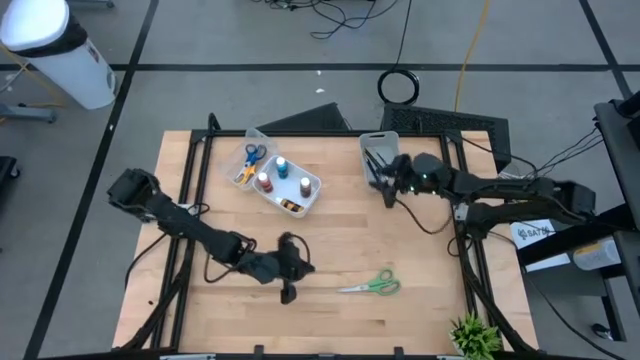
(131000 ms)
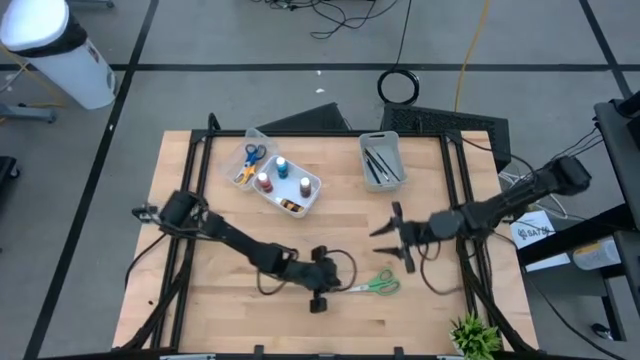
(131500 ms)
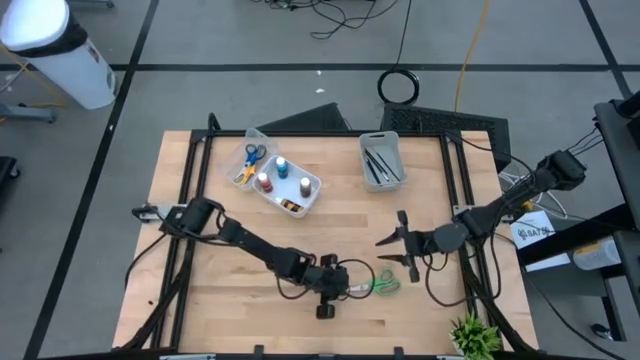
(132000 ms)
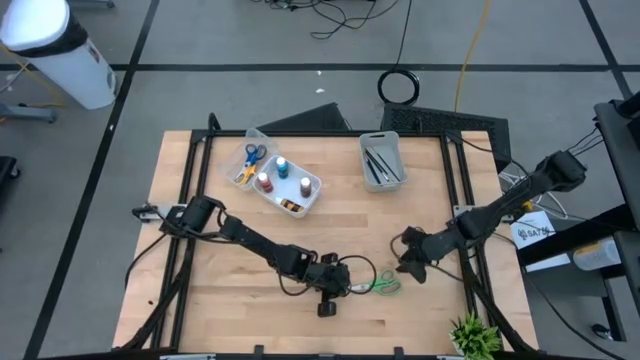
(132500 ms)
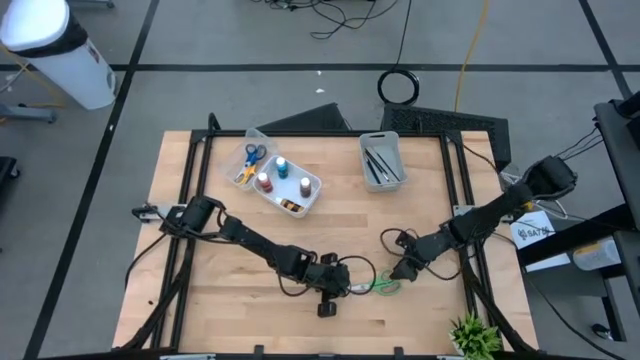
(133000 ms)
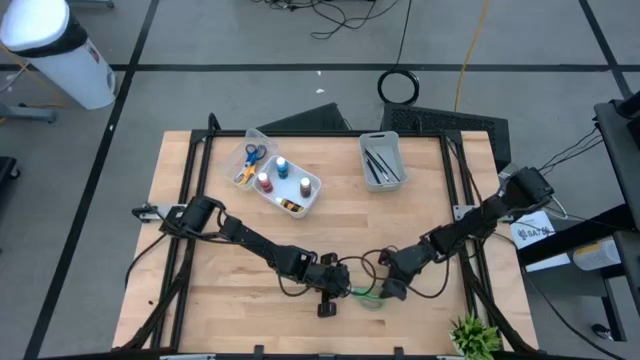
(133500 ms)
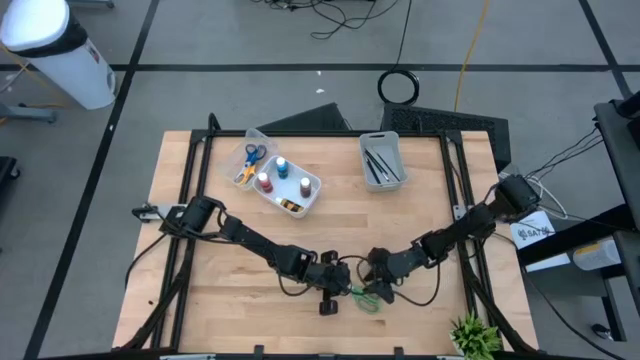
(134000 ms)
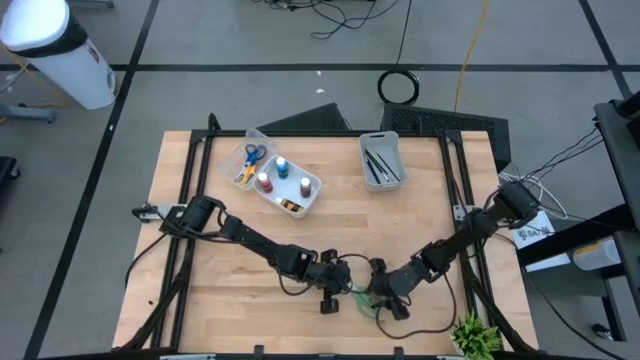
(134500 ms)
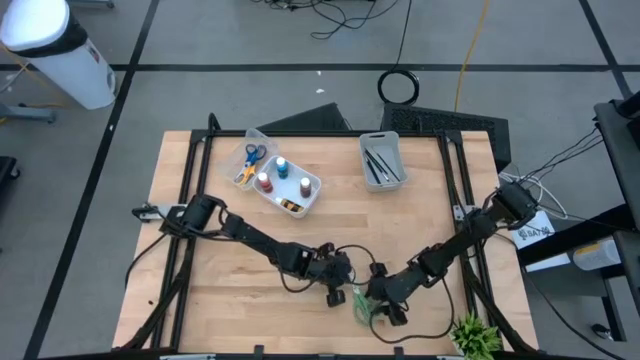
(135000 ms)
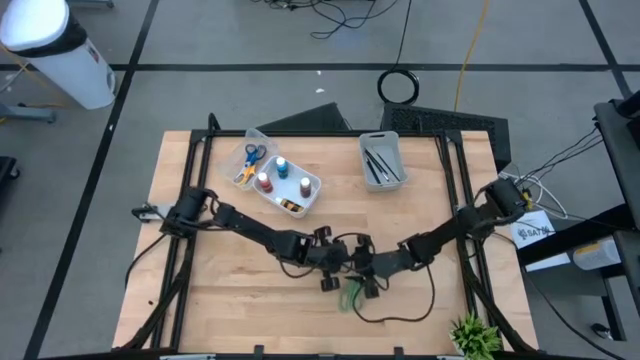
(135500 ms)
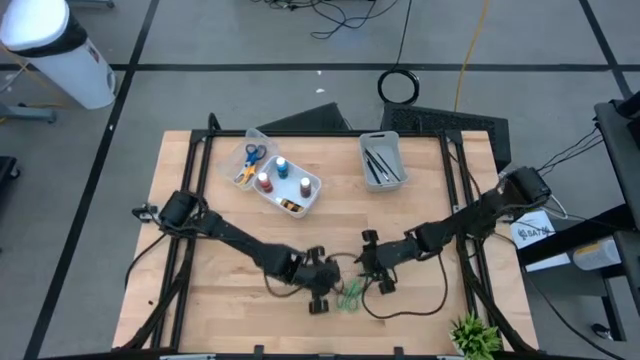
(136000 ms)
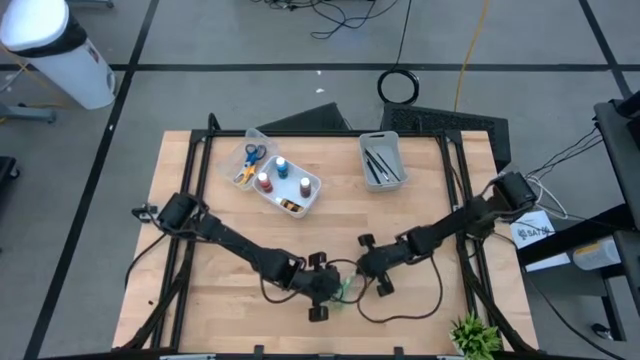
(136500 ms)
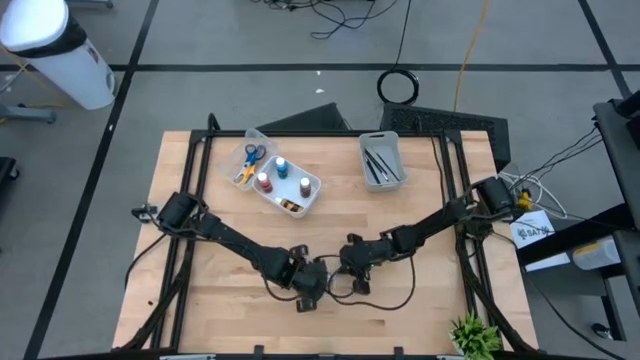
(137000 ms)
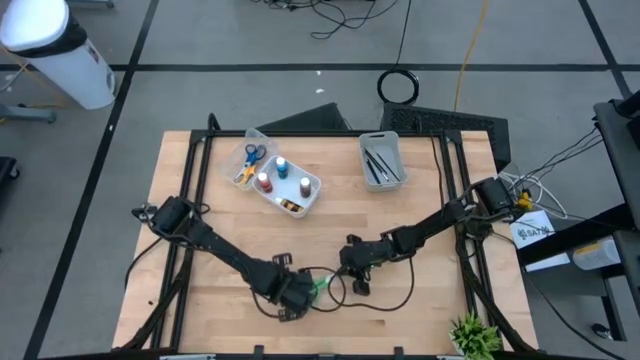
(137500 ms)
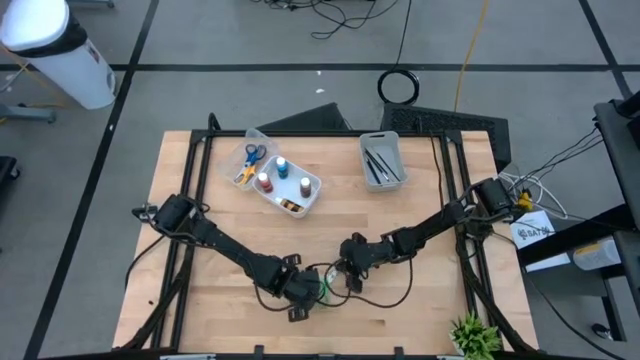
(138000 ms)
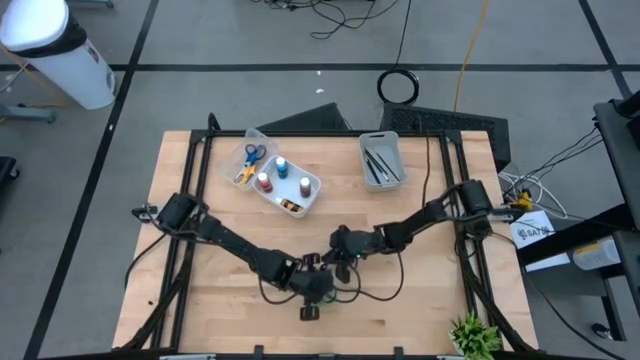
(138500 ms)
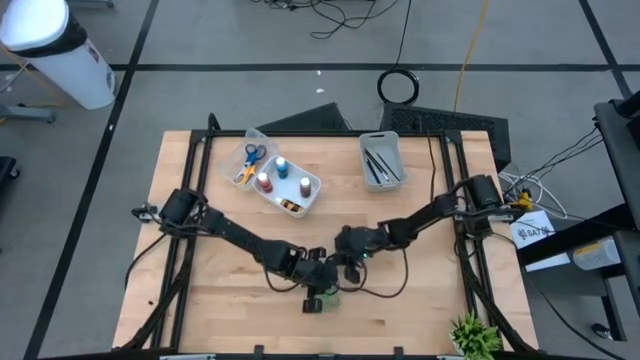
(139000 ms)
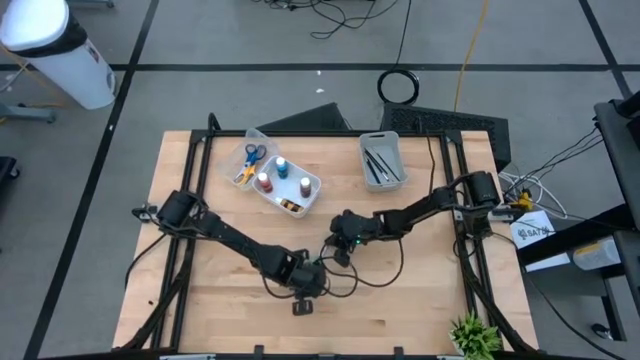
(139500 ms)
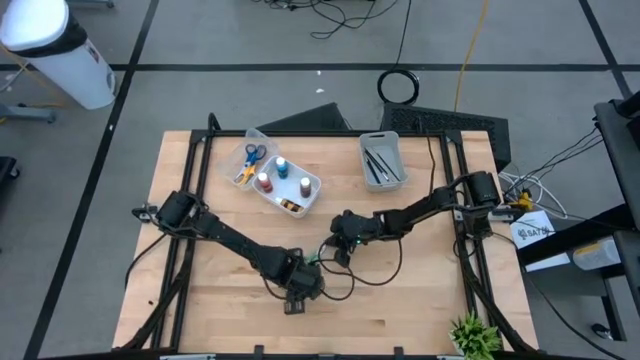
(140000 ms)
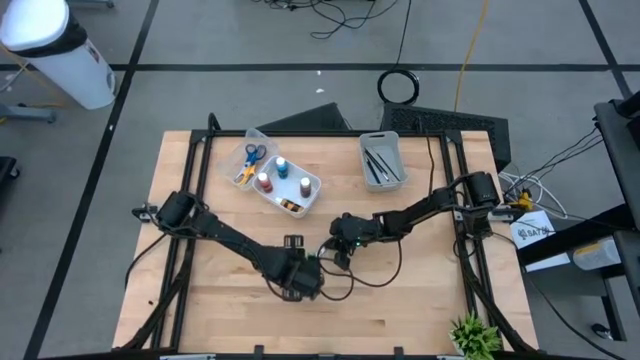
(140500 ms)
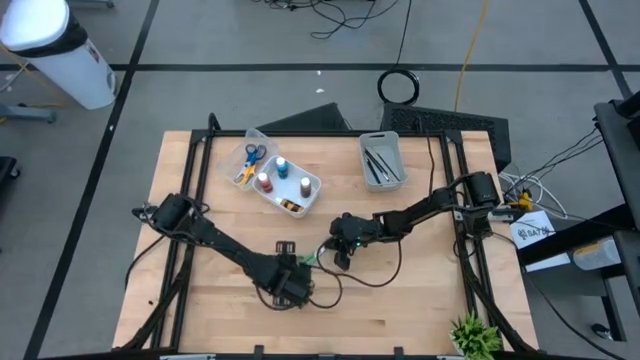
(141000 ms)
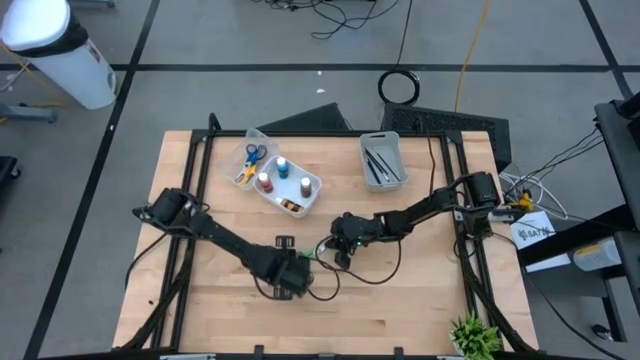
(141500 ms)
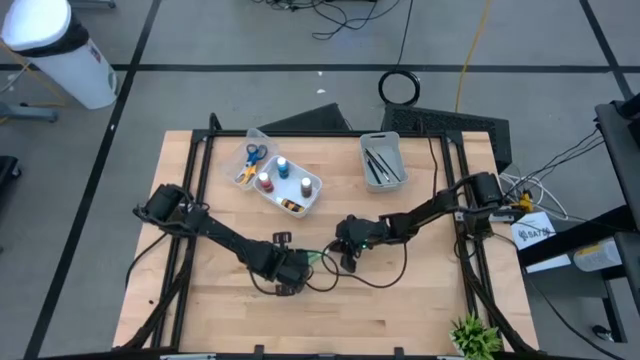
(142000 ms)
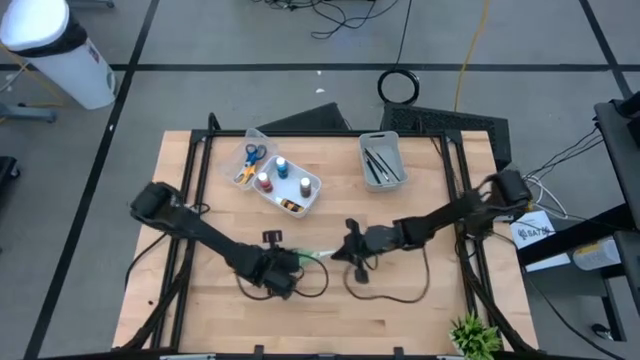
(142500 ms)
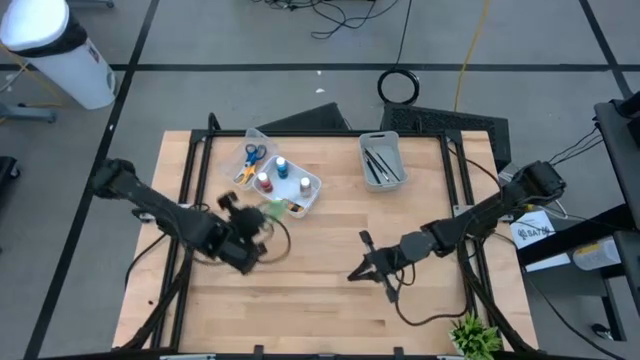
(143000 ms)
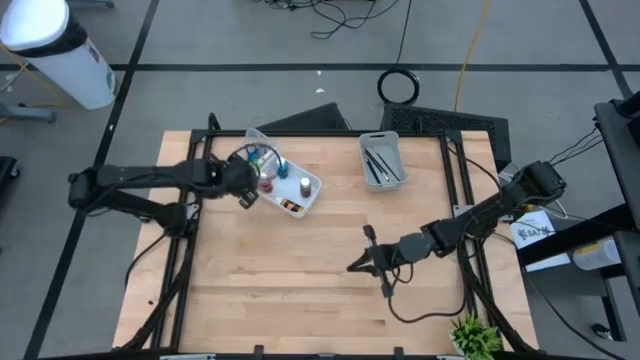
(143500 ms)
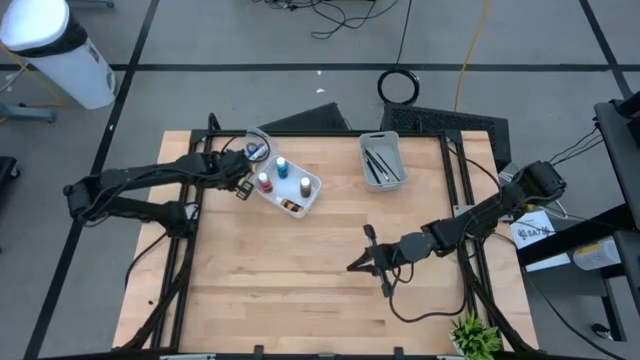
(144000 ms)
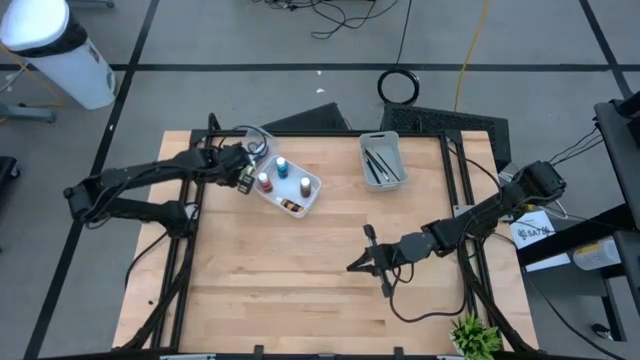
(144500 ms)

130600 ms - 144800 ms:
Task: Pick & Place Paint Supplies
Put the green scissors into the transparent bin

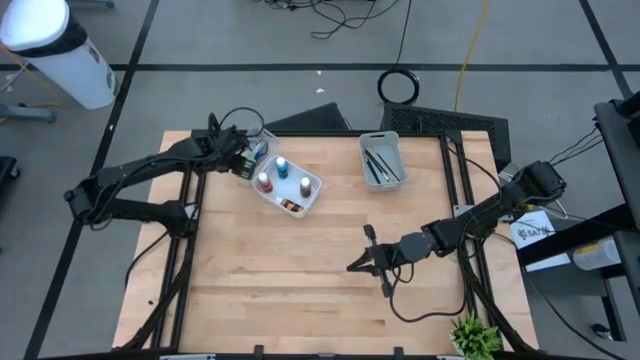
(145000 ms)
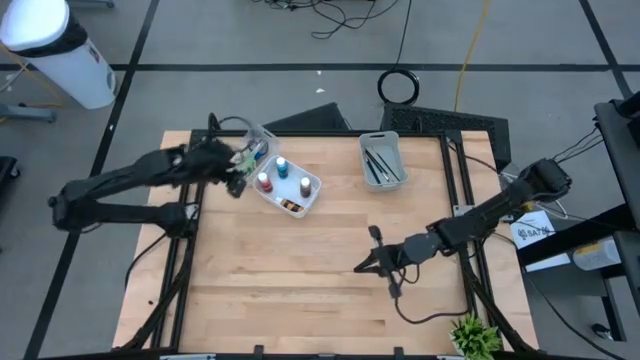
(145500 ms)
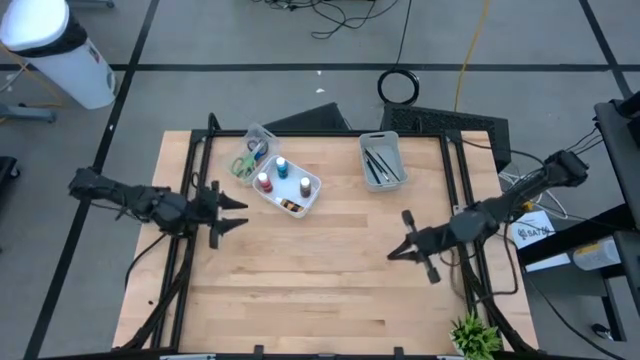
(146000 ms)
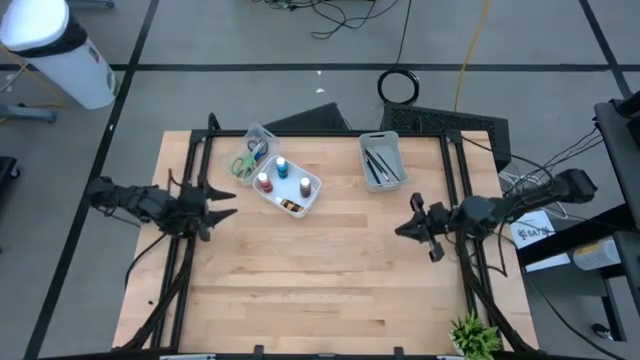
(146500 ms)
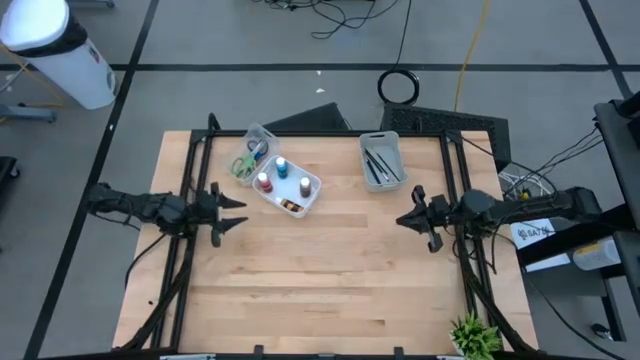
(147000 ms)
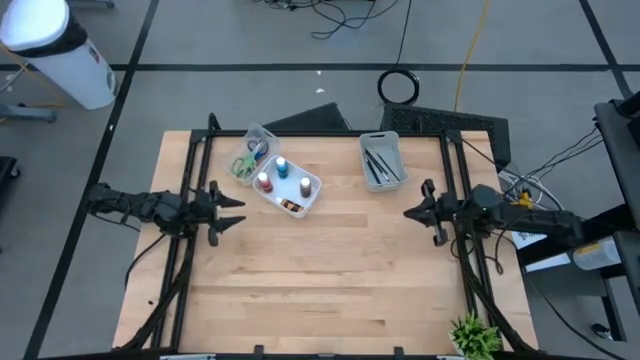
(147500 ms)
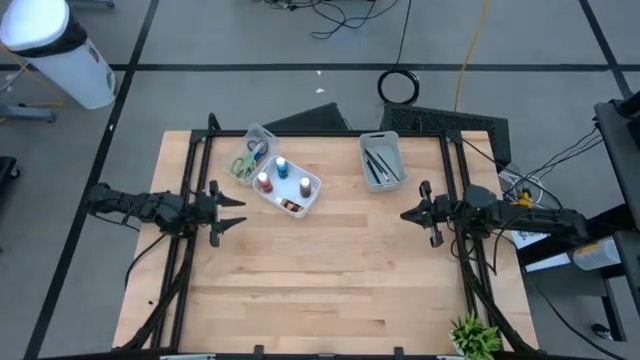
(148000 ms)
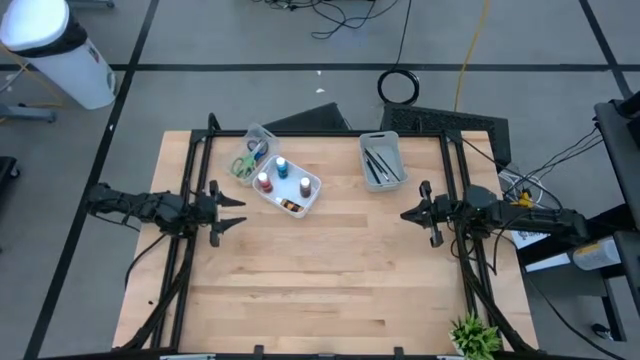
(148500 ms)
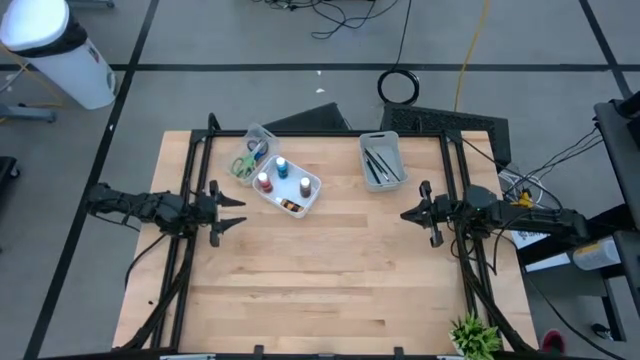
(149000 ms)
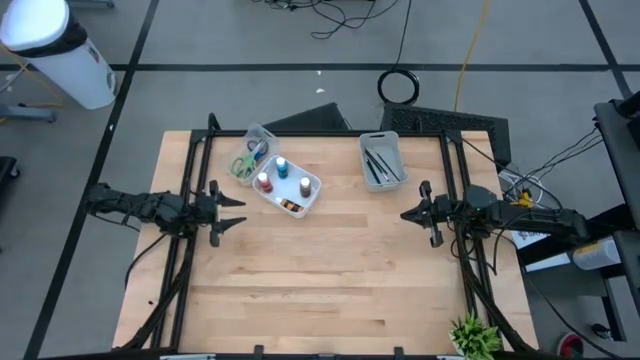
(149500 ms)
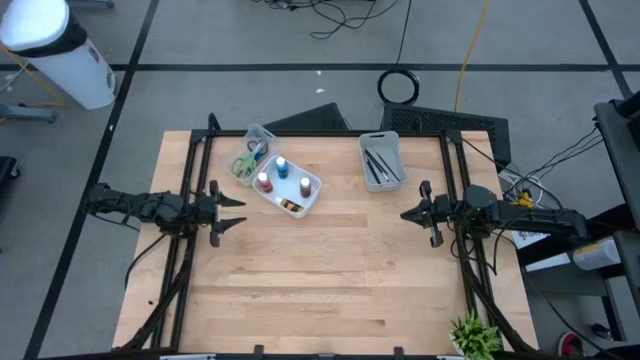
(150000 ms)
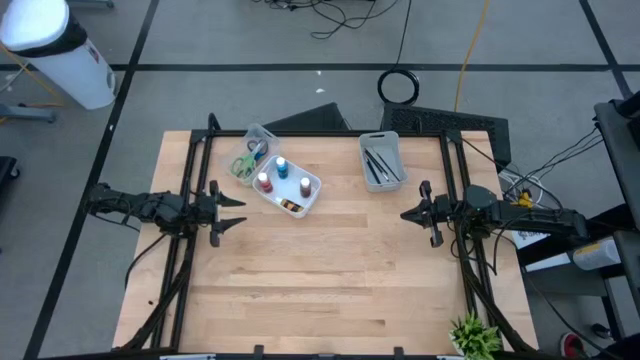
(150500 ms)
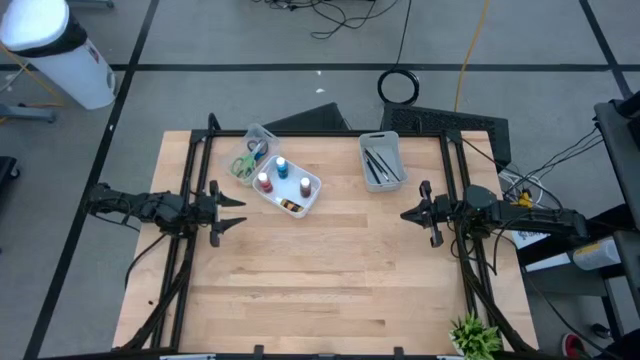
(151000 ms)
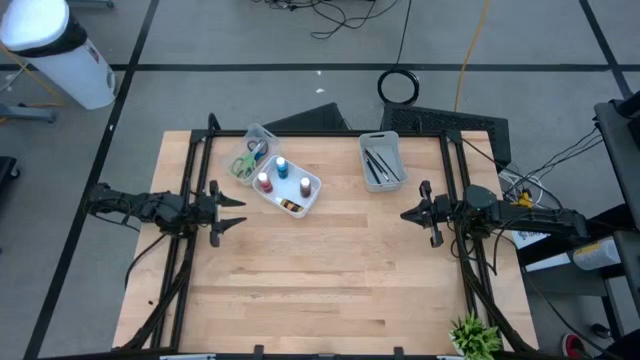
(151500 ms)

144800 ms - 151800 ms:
Return to Home Position
